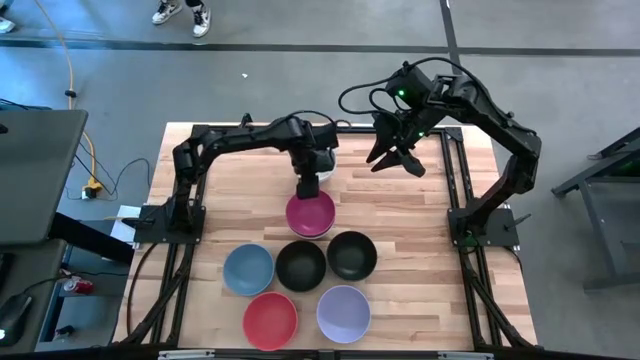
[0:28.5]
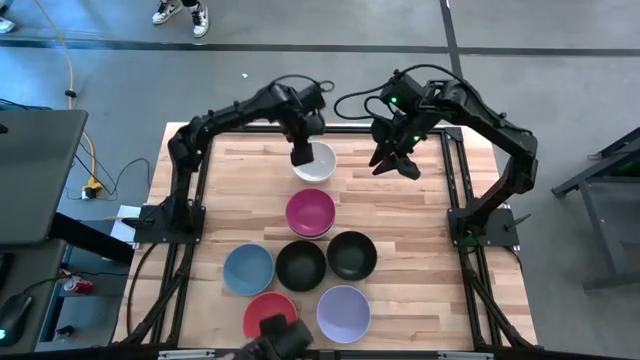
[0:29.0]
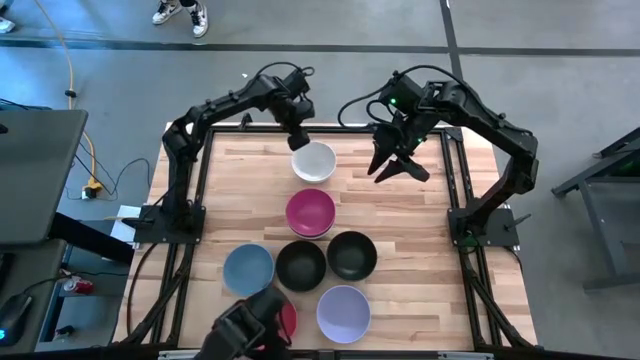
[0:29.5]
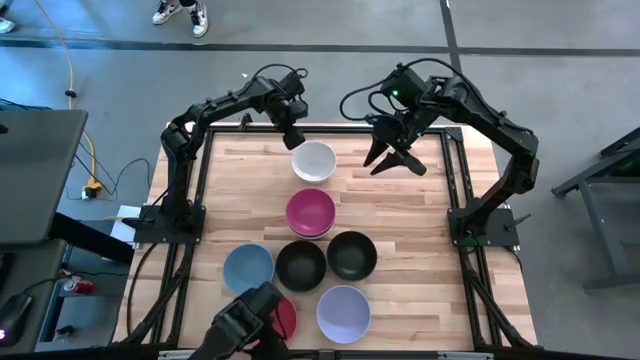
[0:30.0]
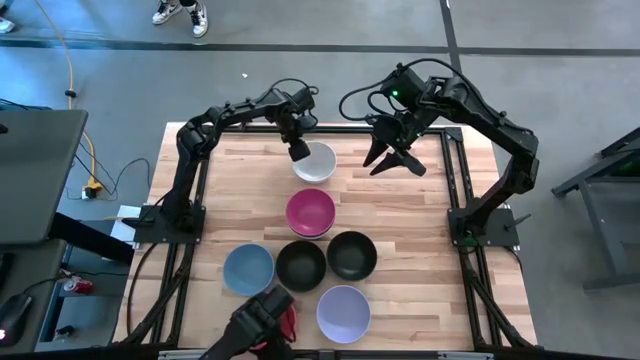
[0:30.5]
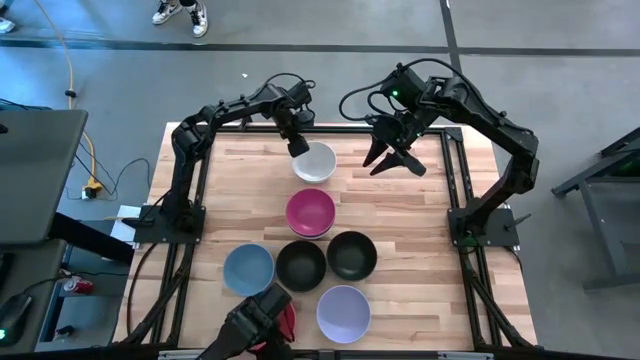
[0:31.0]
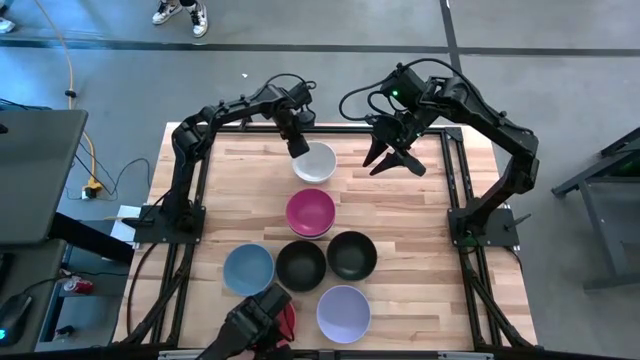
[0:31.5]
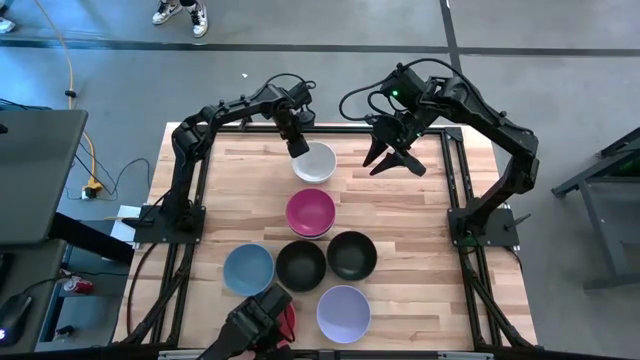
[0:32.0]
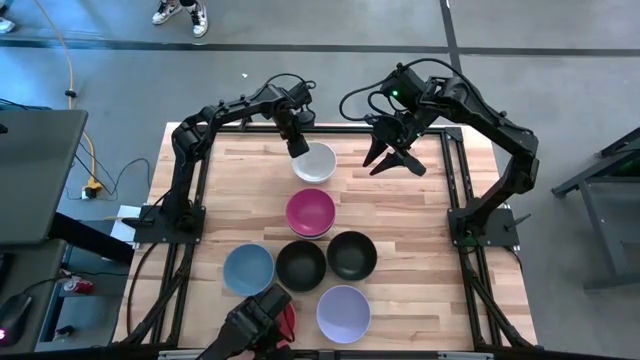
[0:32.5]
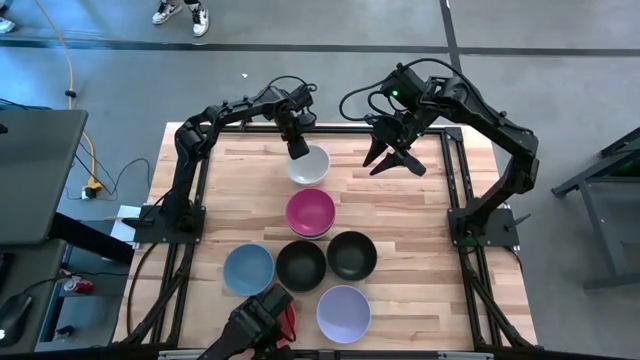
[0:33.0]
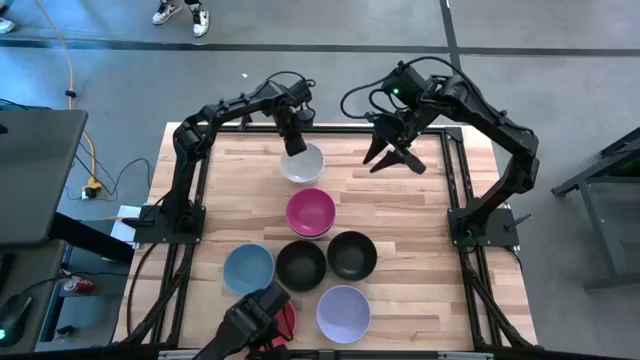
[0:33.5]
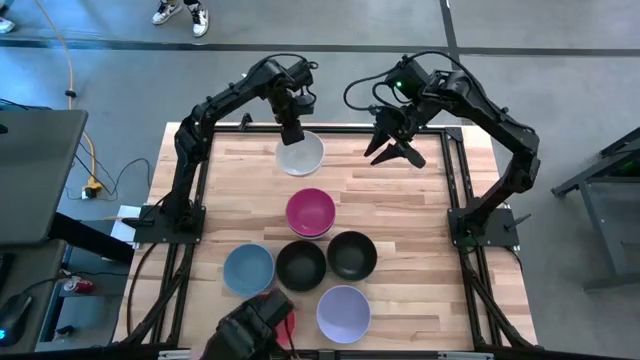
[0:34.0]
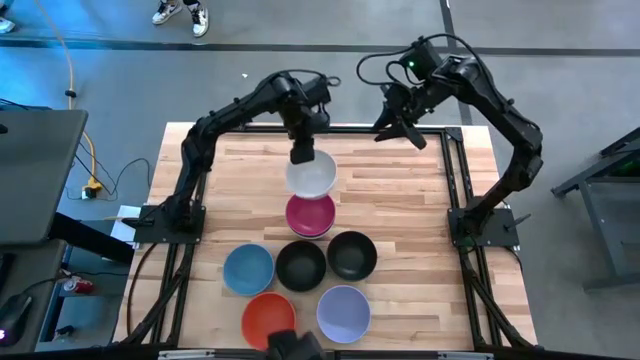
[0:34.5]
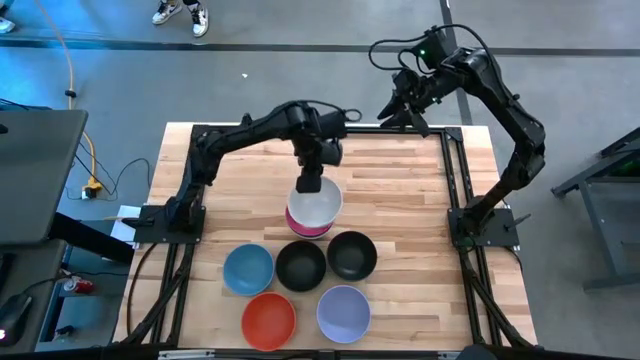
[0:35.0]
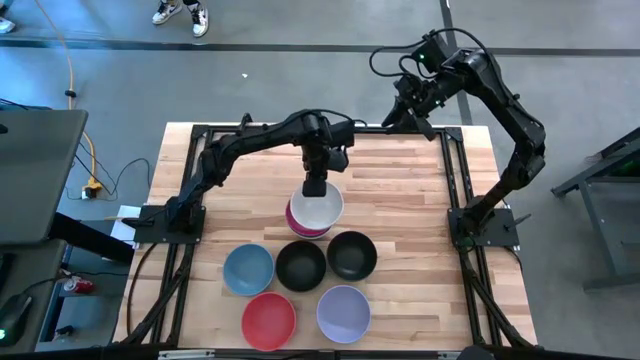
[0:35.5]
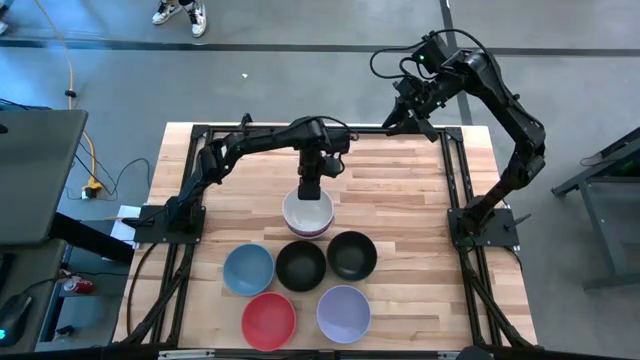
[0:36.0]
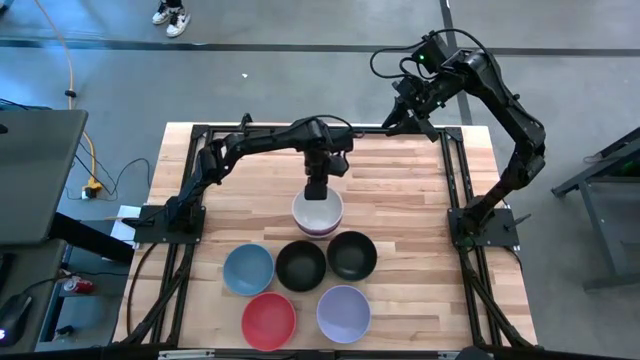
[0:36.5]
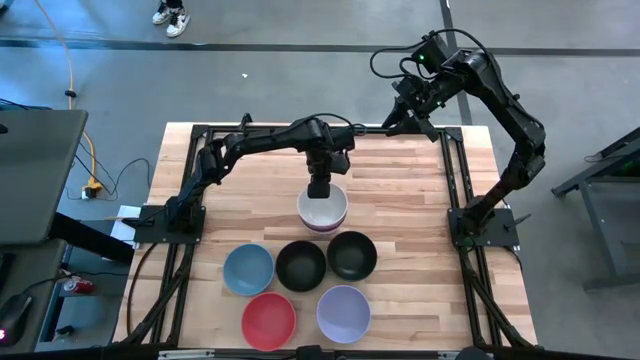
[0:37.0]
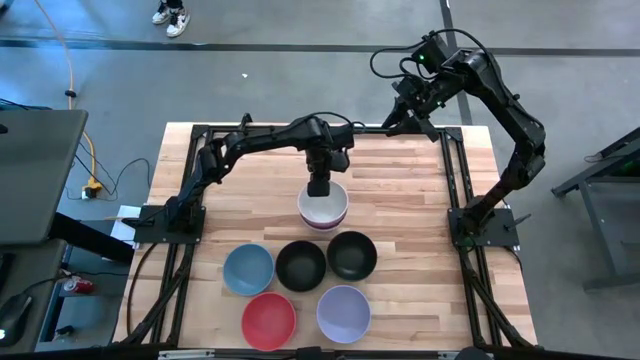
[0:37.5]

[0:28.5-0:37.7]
Task: Nest bowls inside each other
Stack the white bowl on top of the pink bowl

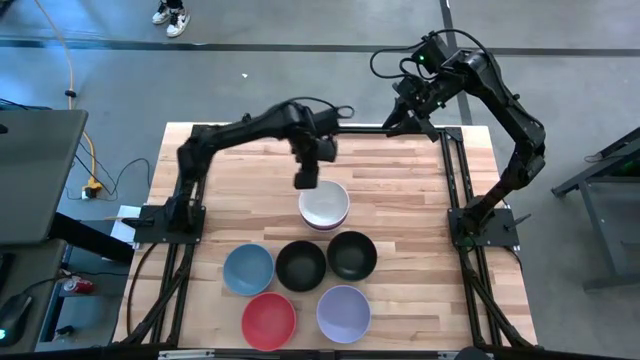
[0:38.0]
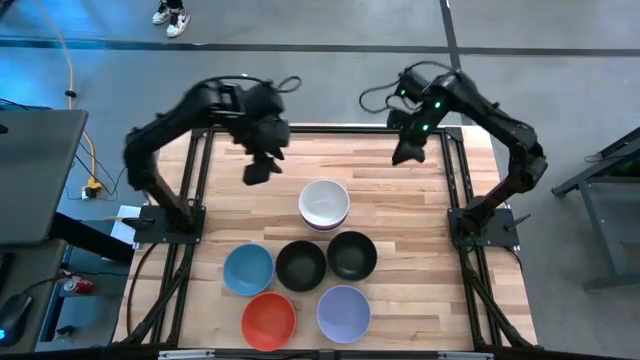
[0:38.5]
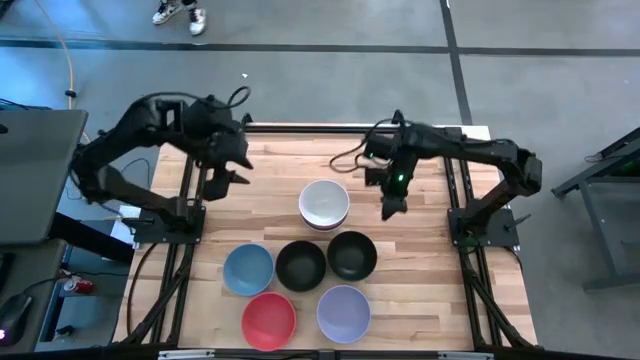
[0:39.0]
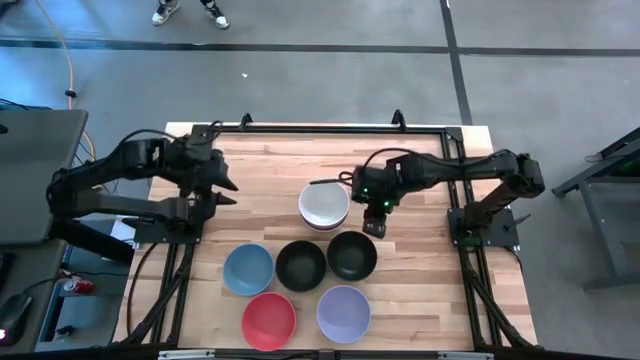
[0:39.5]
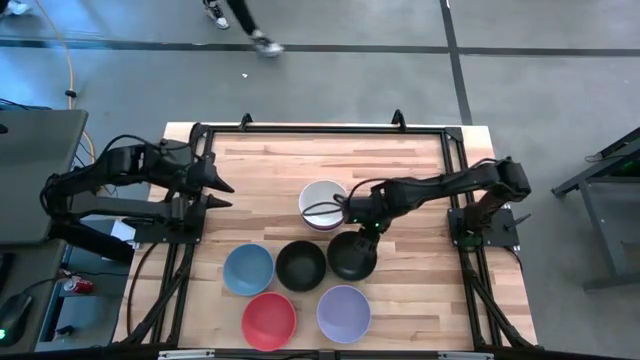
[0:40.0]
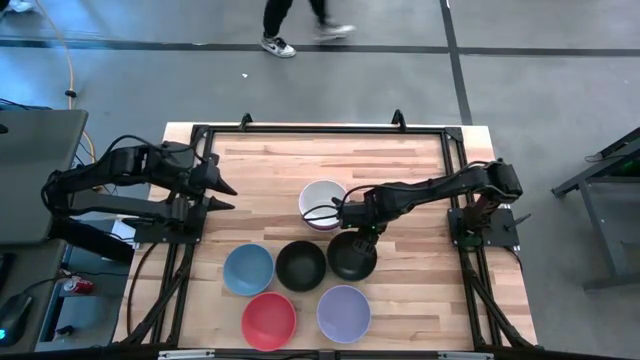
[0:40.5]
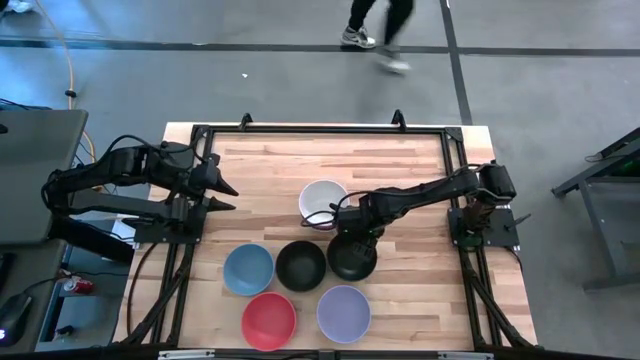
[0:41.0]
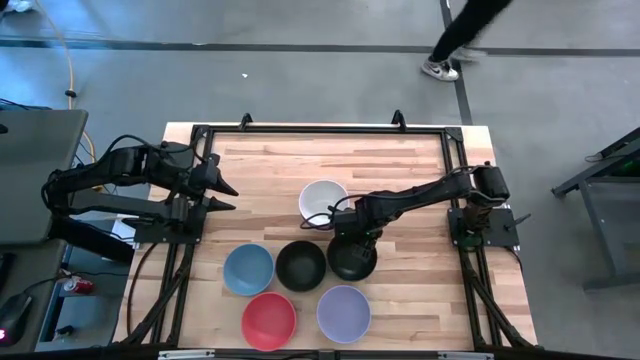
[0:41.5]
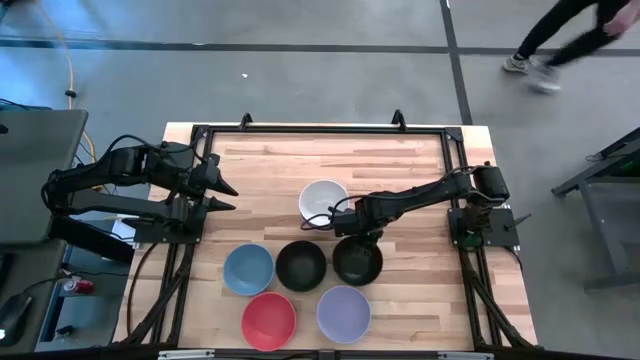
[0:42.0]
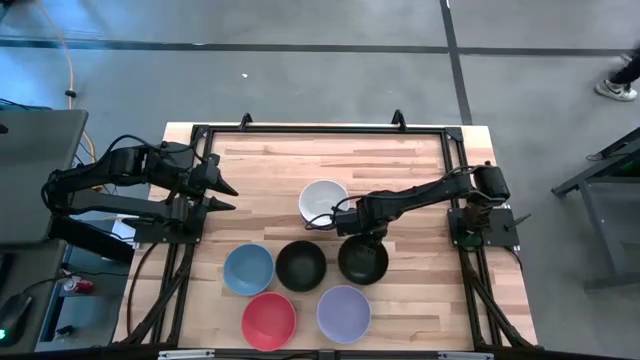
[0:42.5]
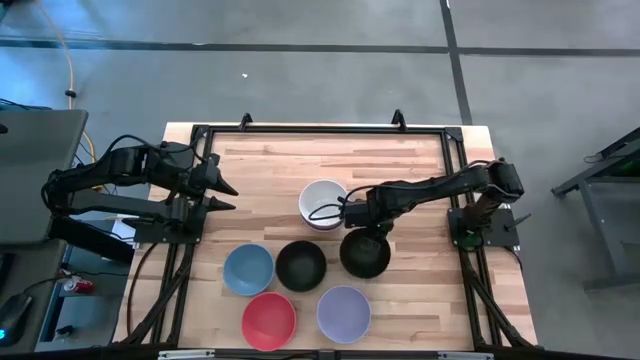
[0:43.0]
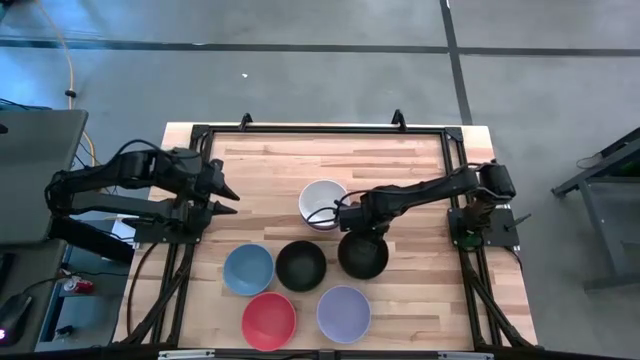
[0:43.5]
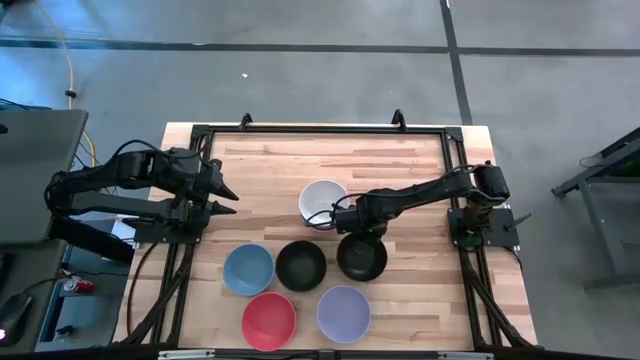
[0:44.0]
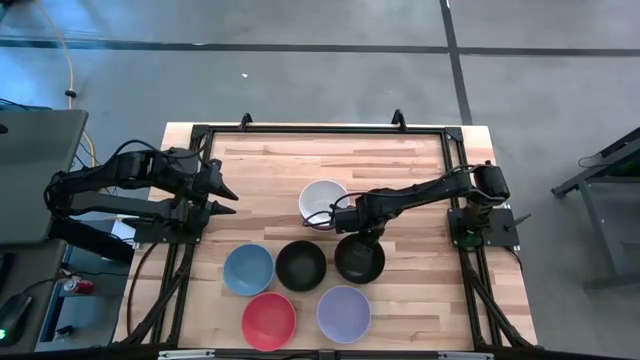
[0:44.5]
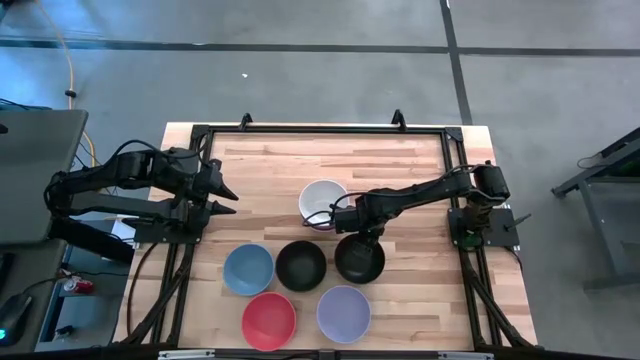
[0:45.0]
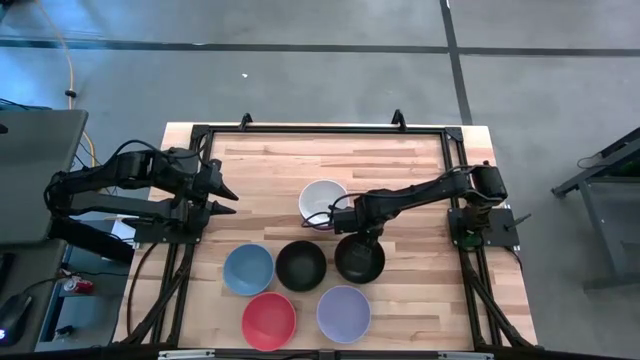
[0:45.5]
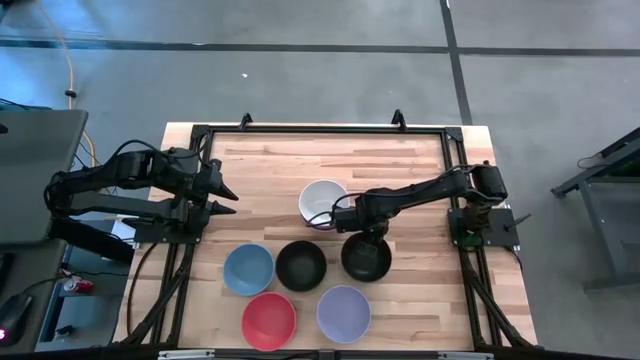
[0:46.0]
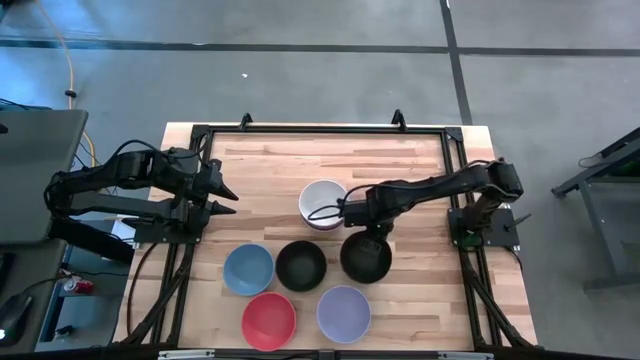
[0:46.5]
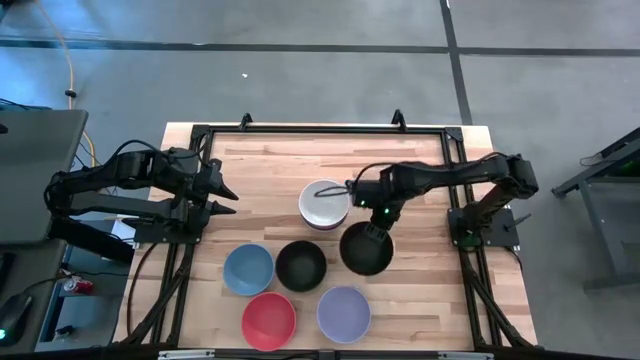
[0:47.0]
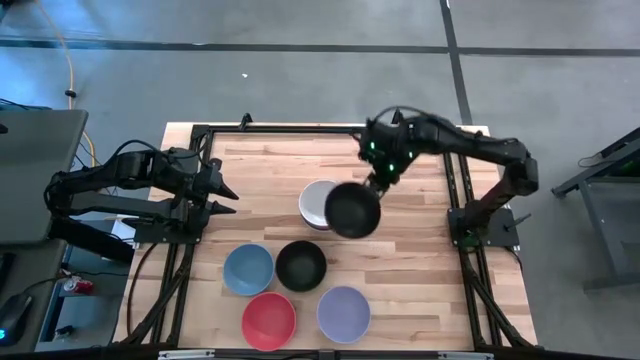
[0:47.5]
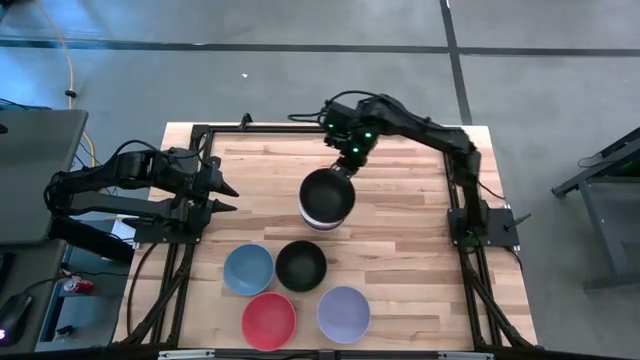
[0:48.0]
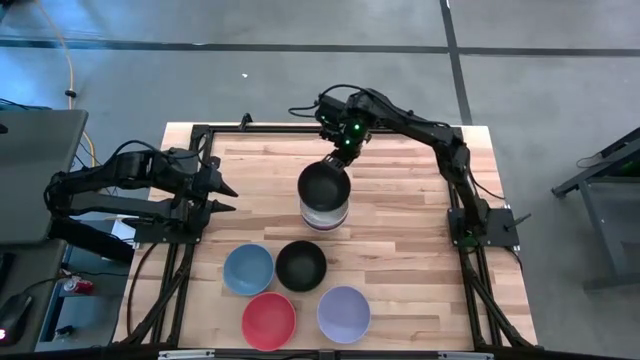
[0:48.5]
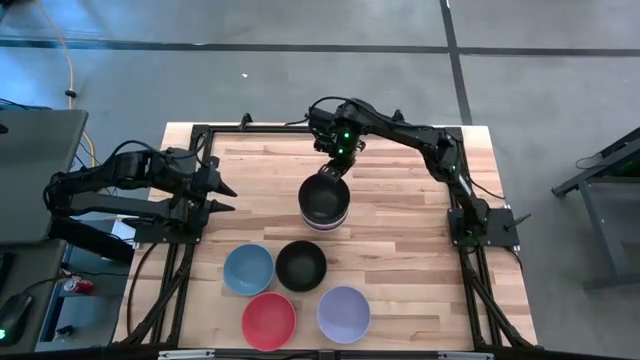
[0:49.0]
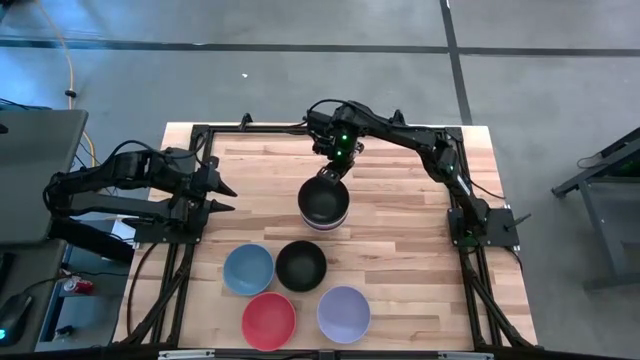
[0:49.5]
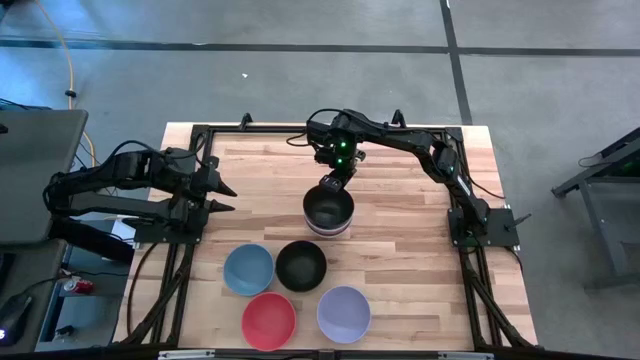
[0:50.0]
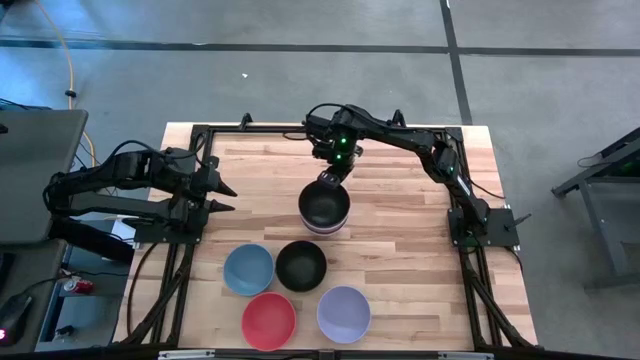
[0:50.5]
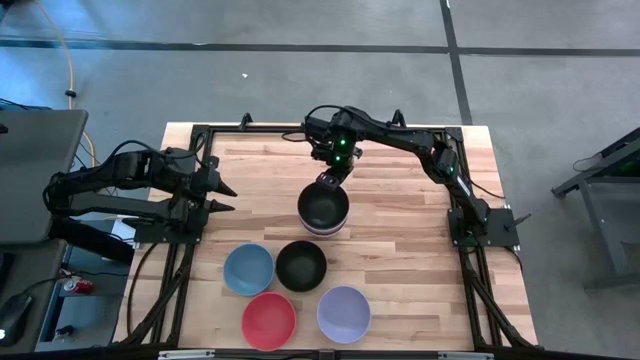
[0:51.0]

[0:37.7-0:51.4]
Stack the right black bowl on top of the white bowl
